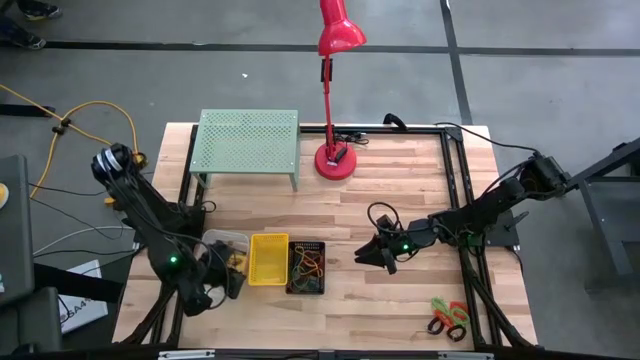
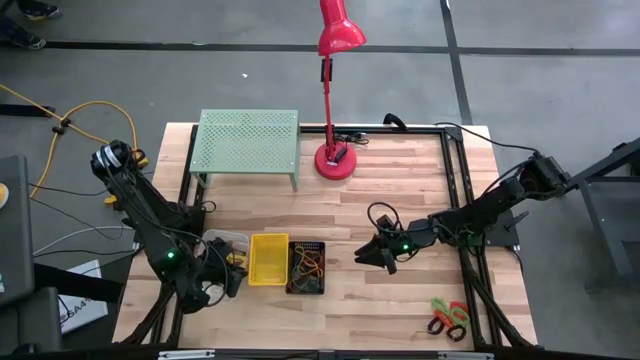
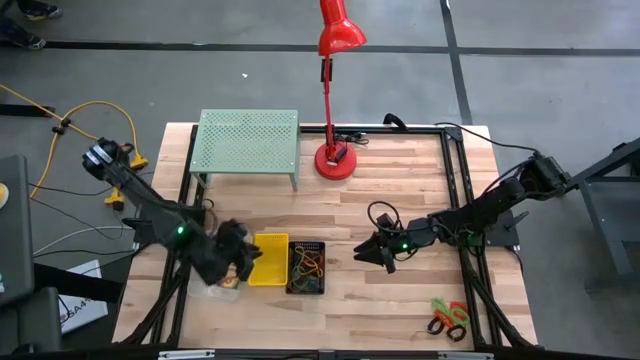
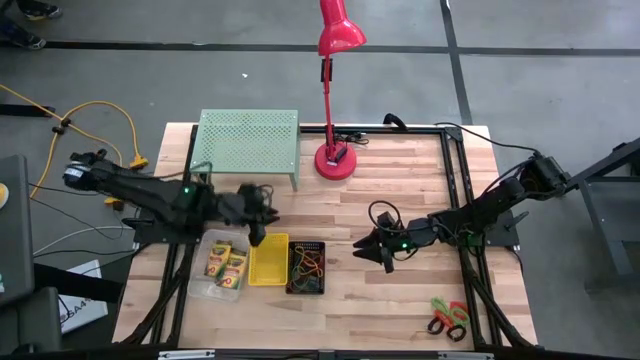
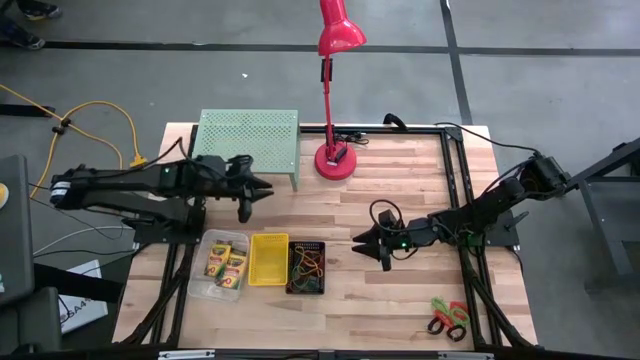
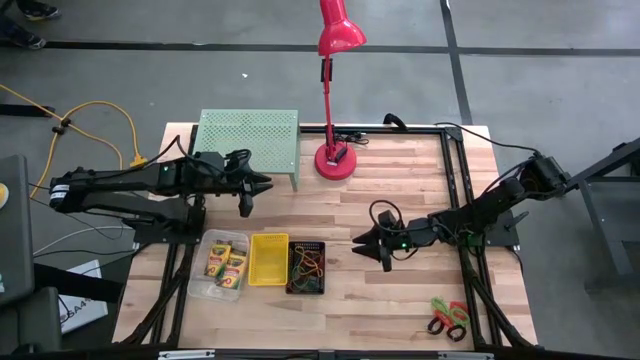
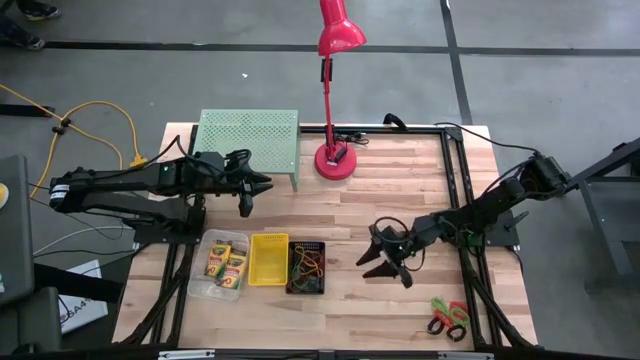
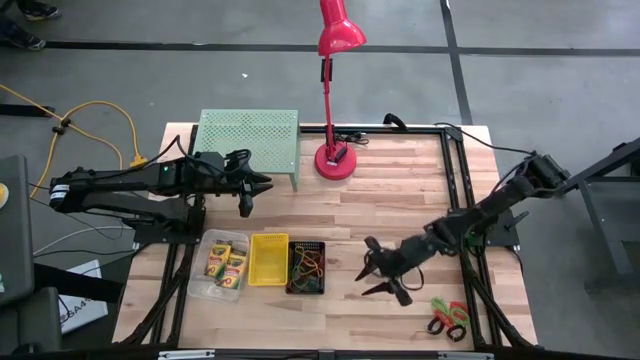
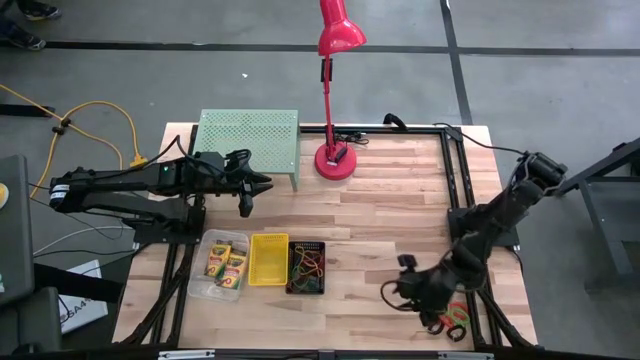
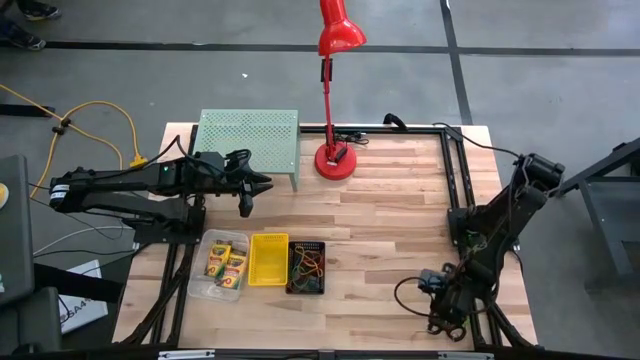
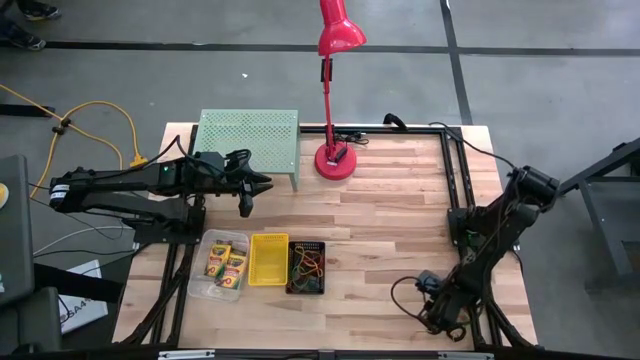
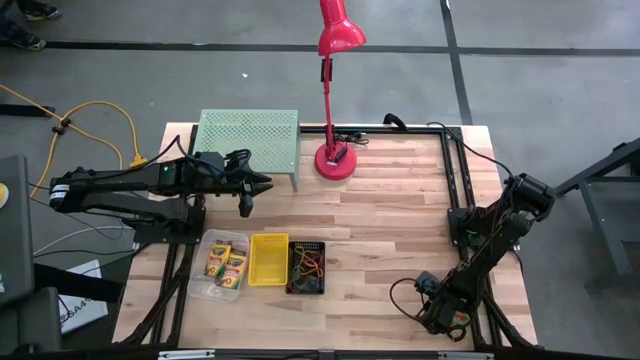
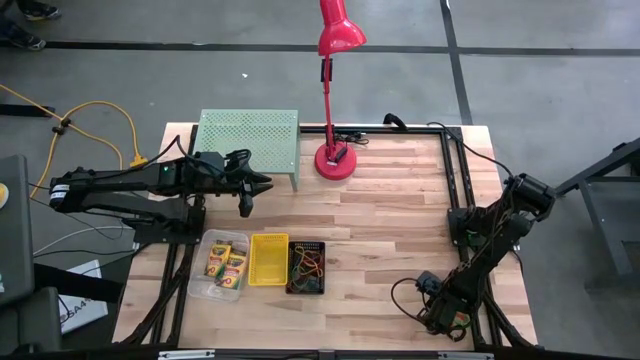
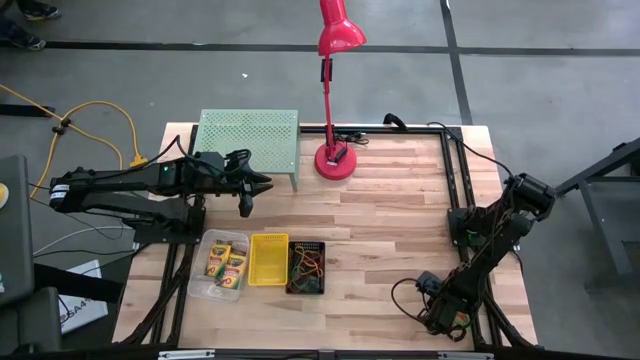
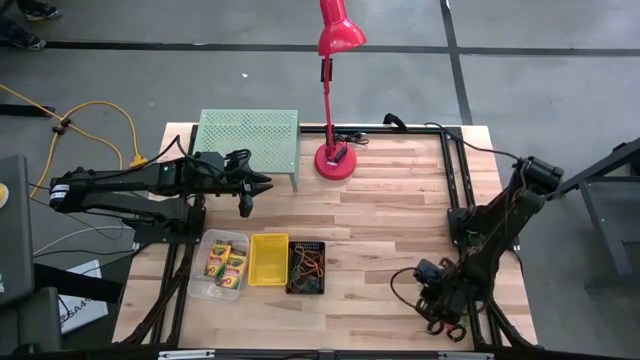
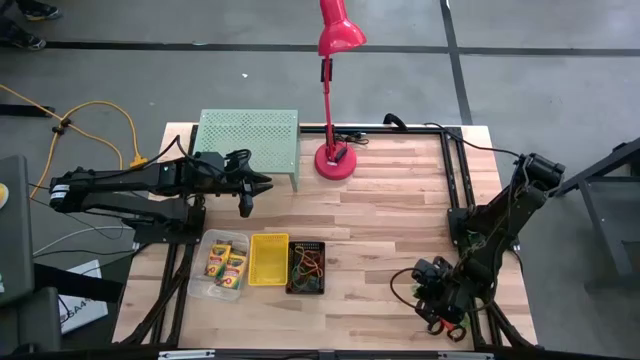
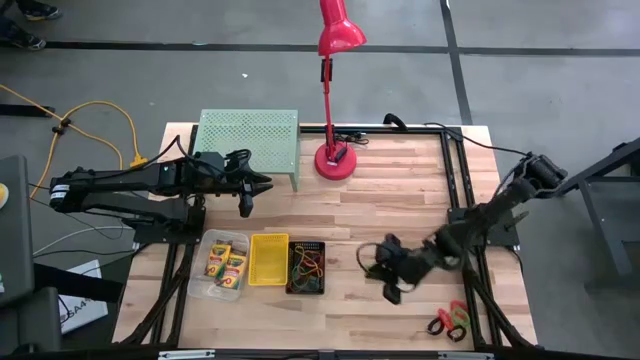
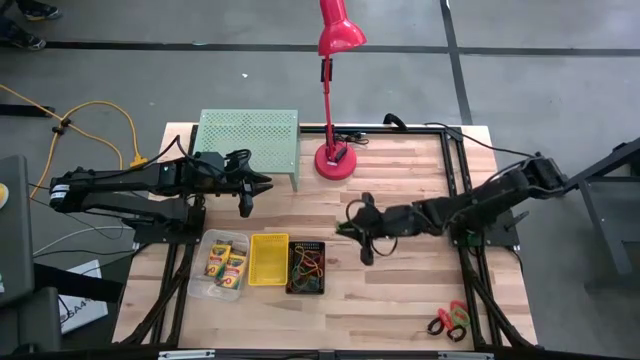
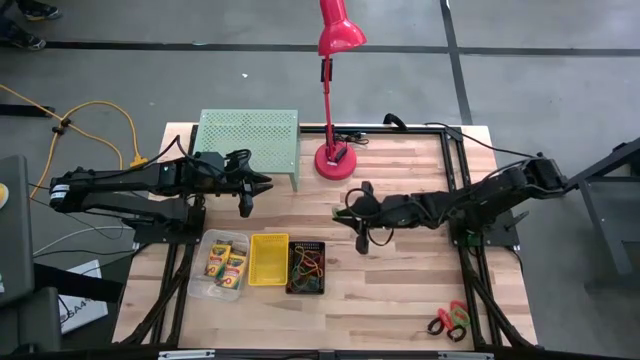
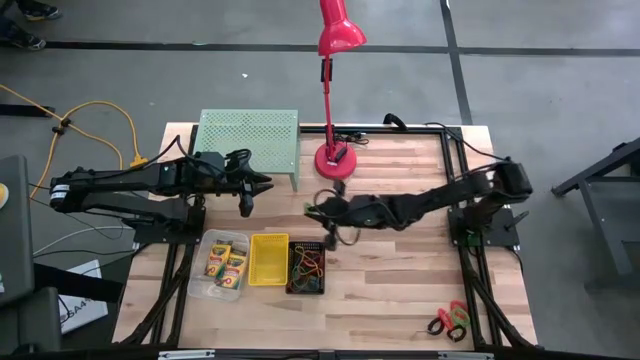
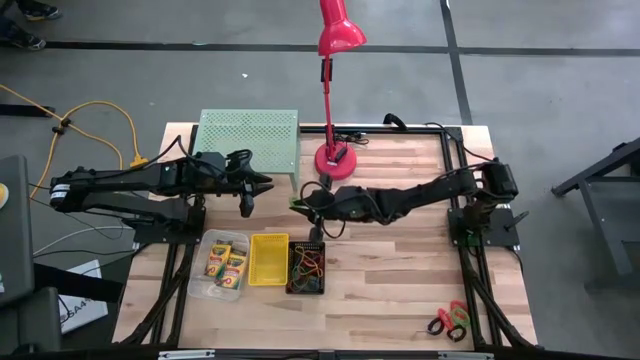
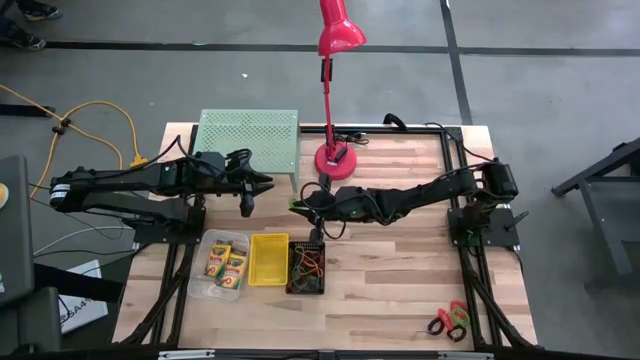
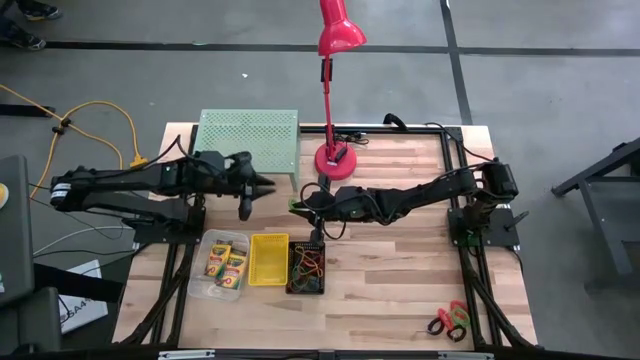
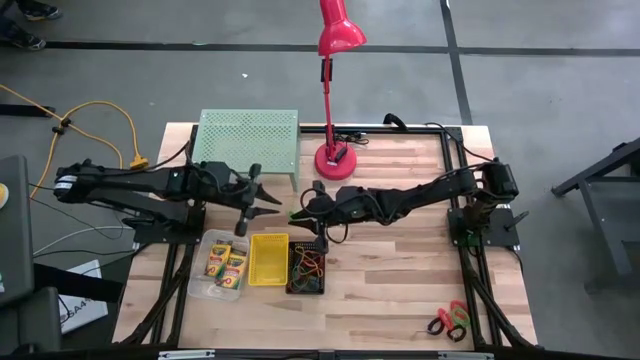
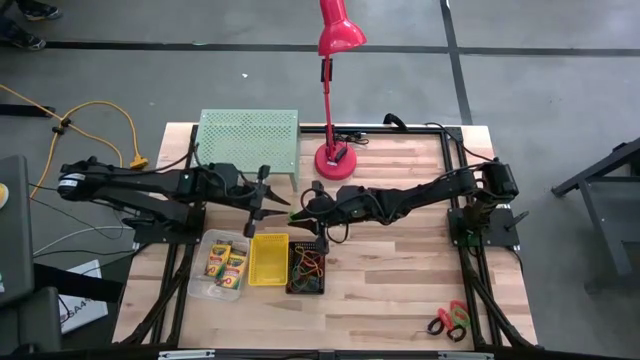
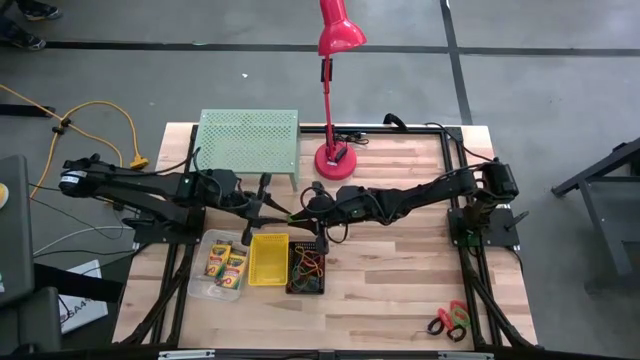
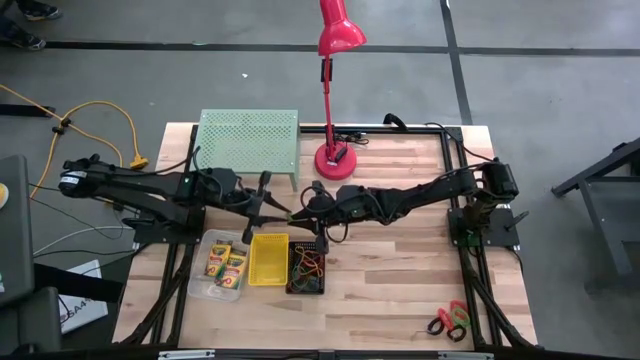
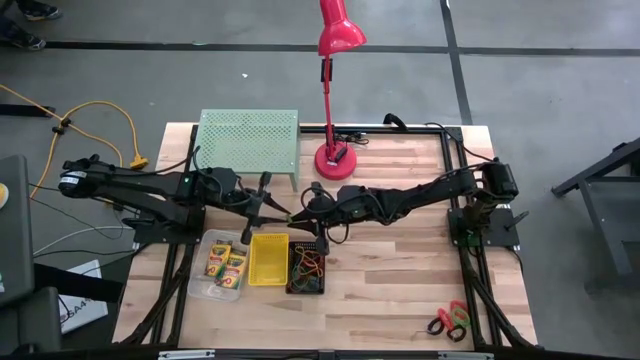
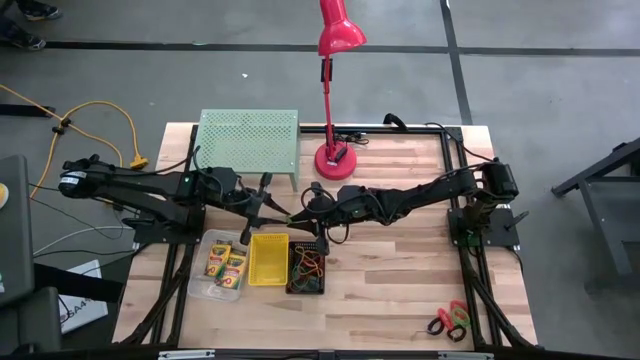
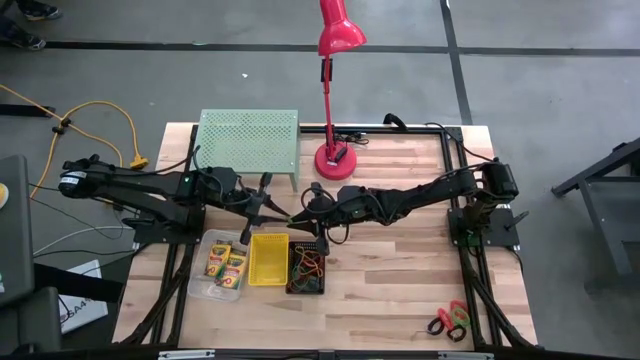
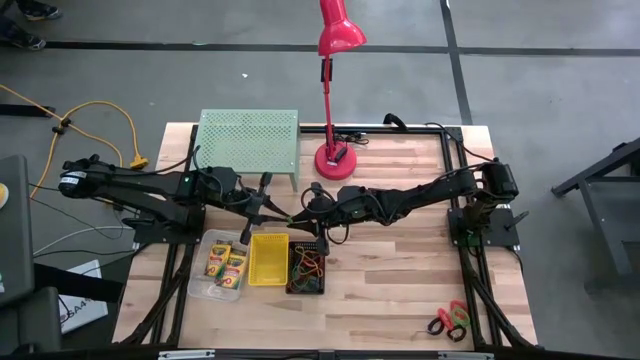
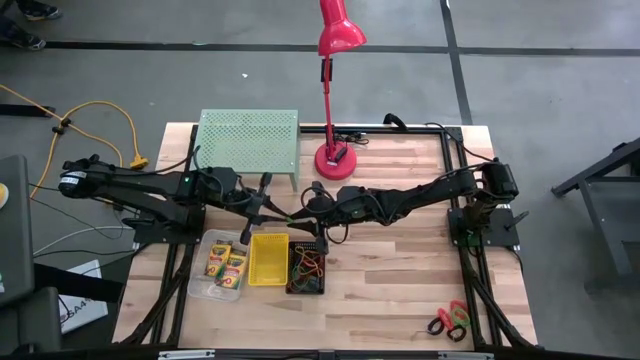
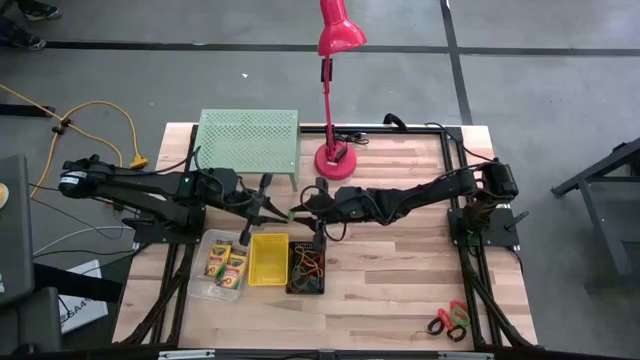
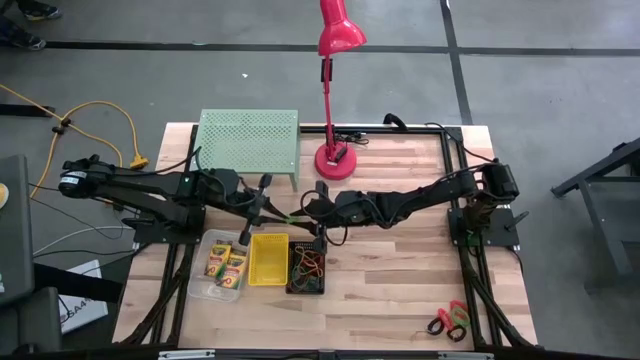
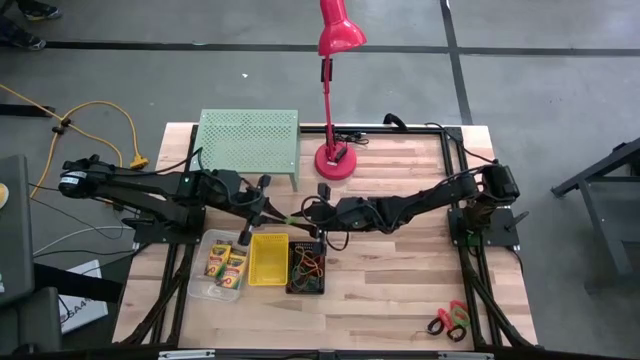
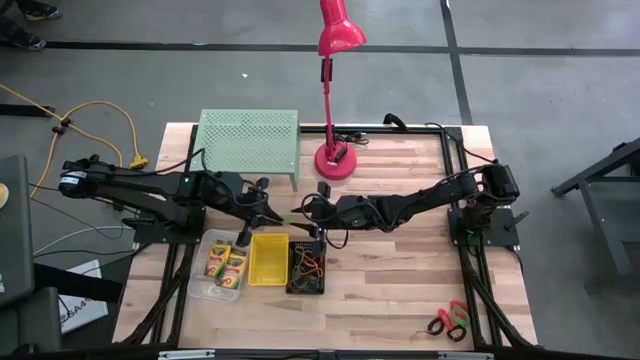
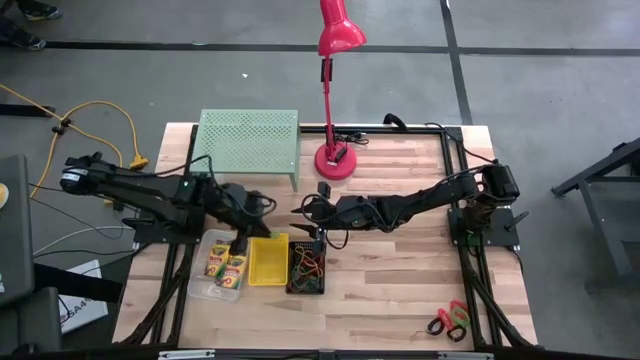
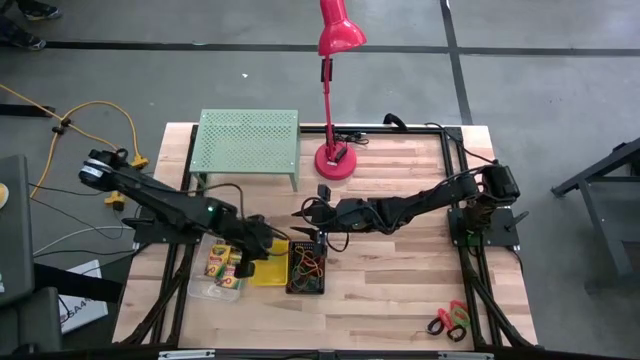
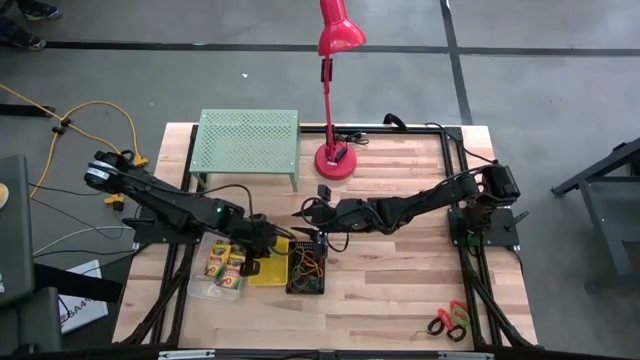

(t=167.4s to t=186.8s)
Task: Pick & Place Office Desk Supplies
Put the green spring keychain into the yellow bin
